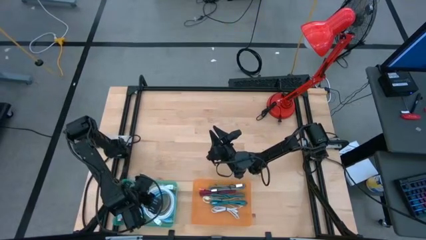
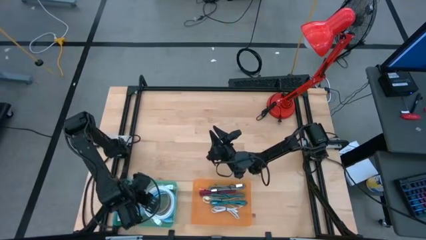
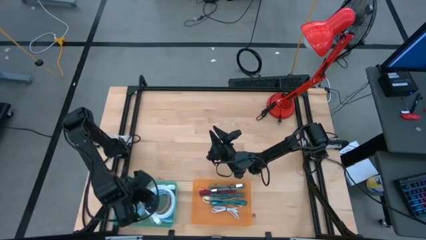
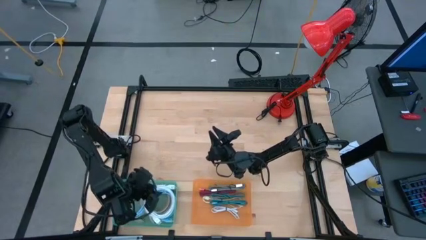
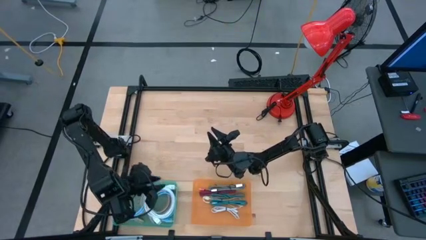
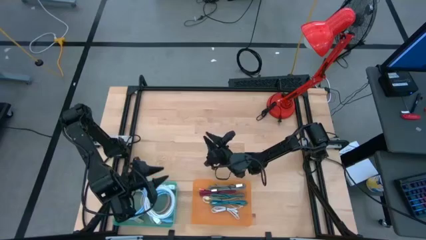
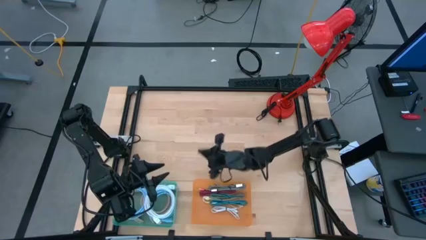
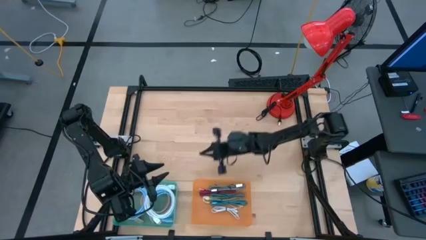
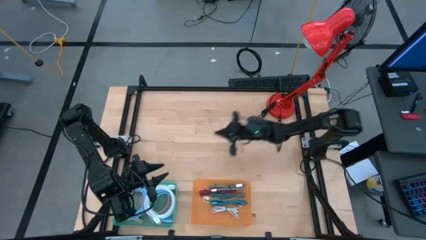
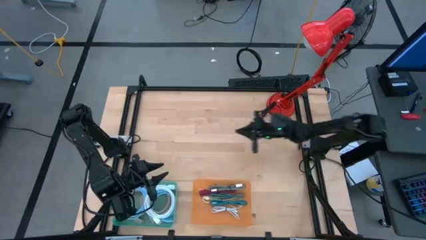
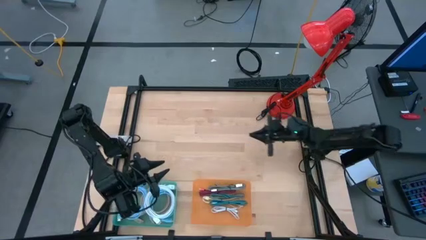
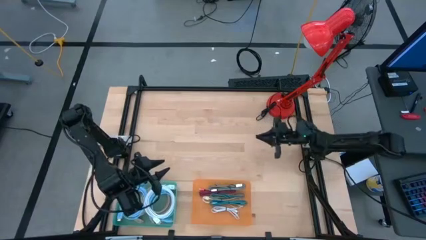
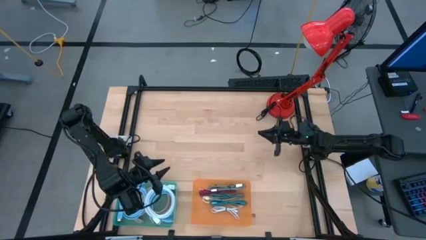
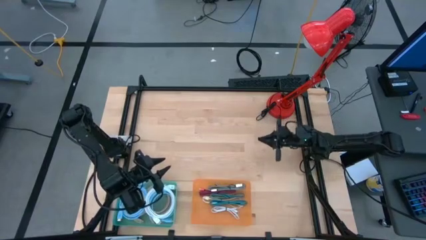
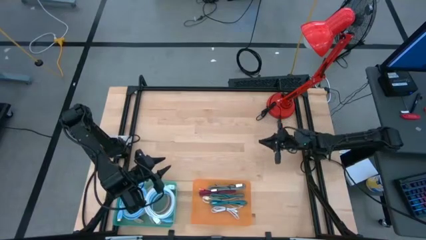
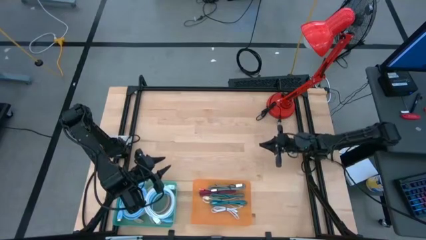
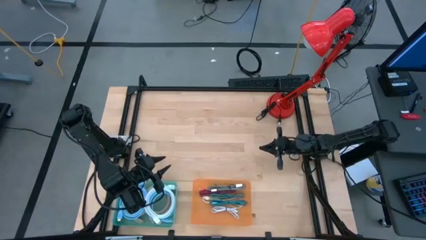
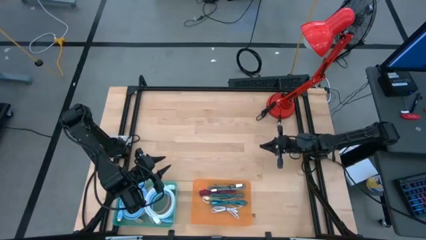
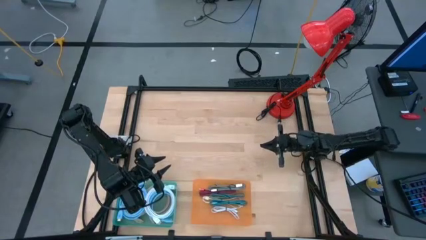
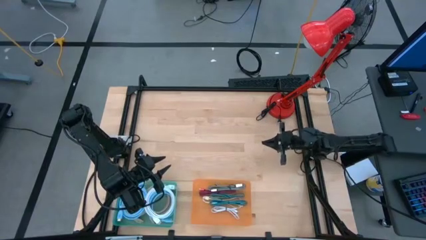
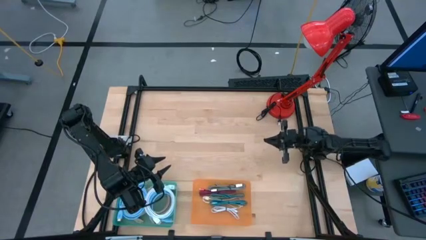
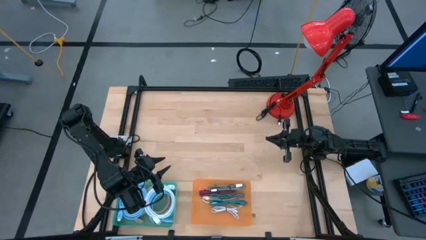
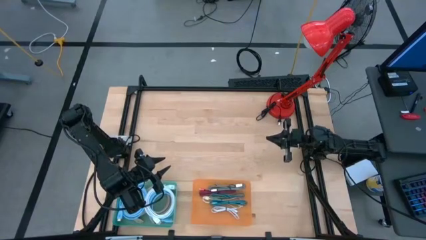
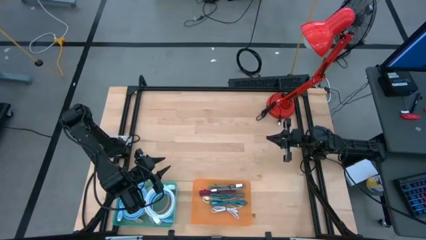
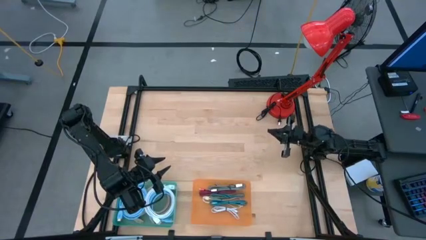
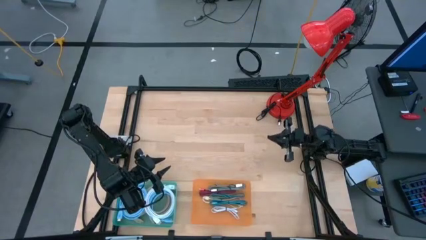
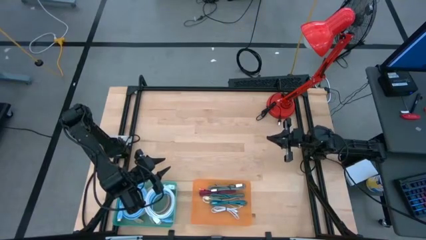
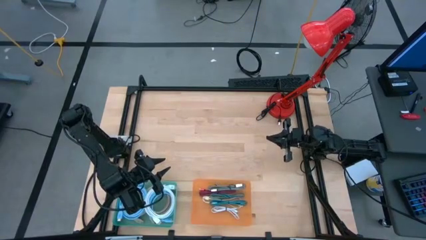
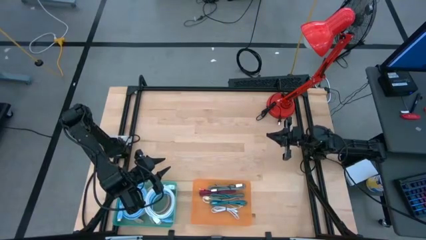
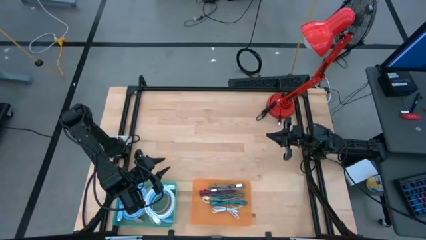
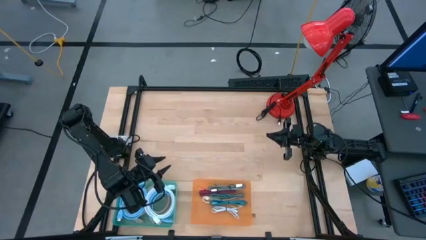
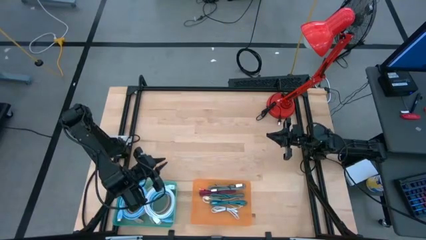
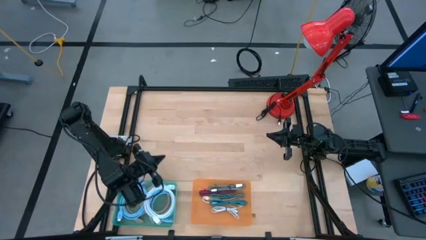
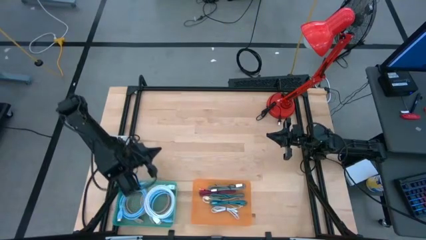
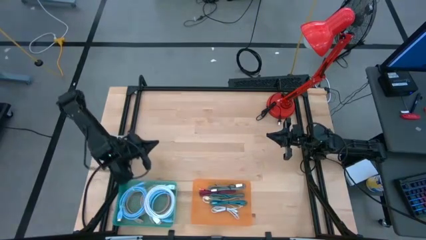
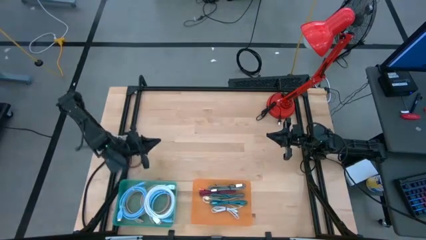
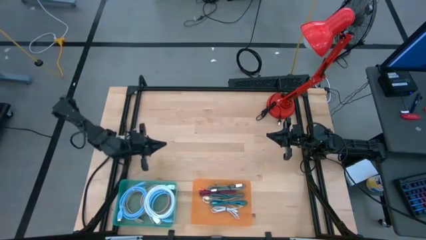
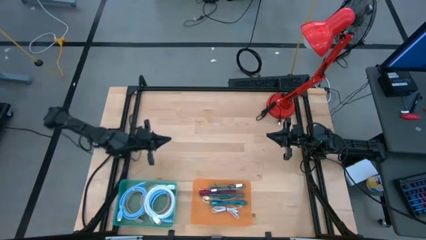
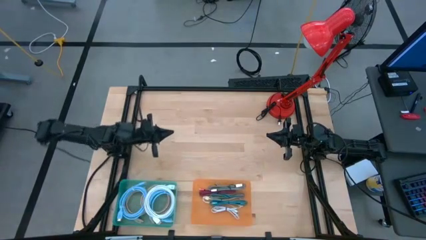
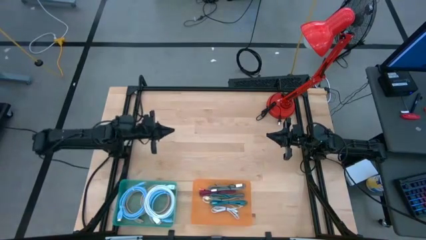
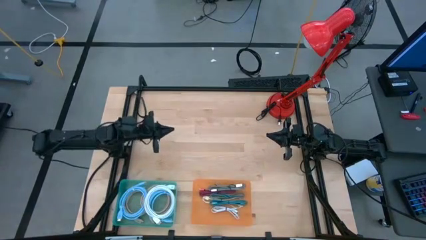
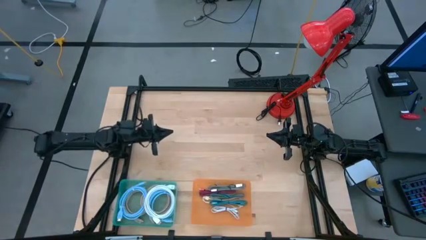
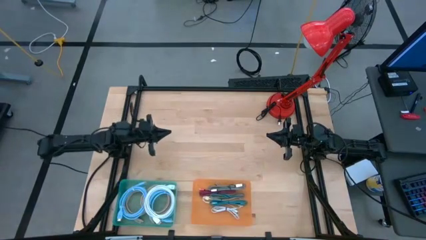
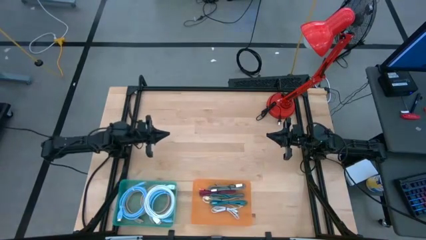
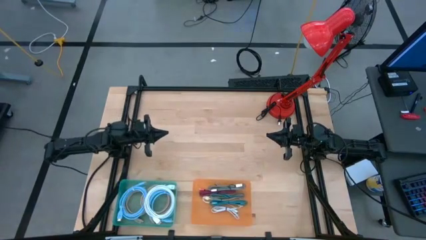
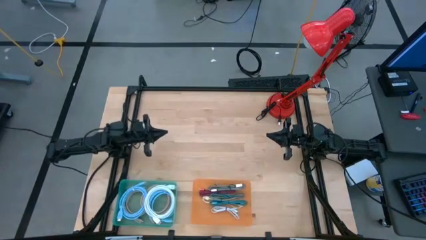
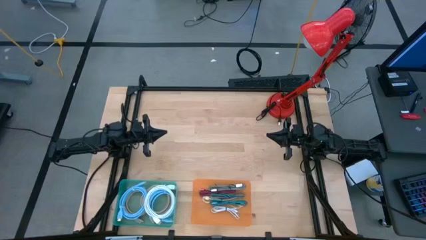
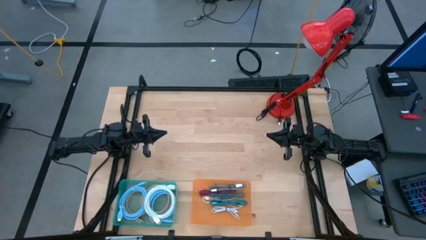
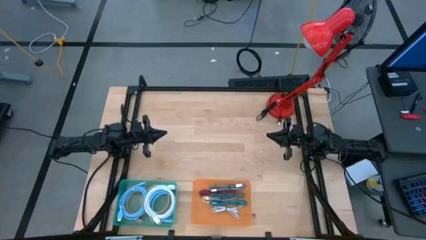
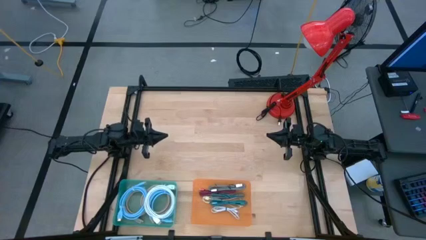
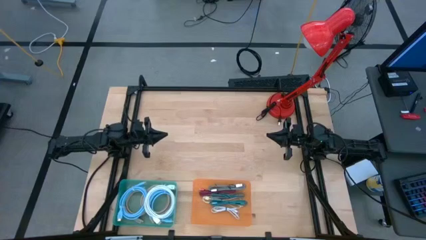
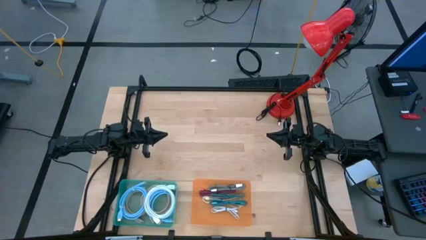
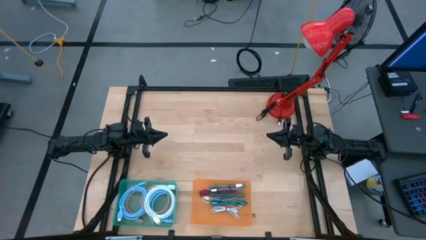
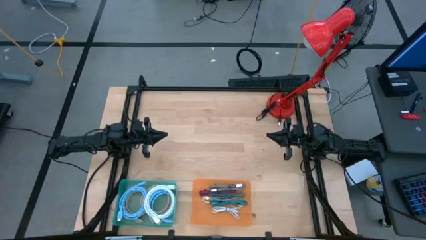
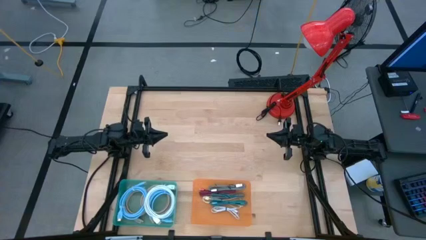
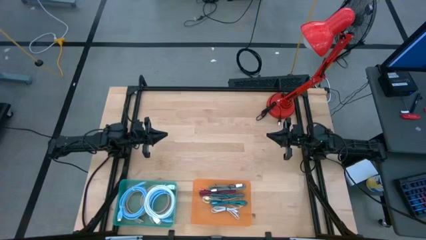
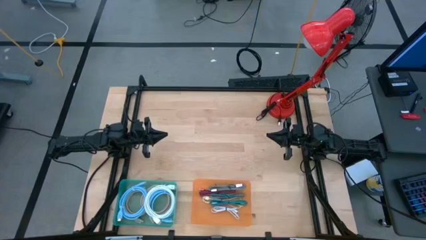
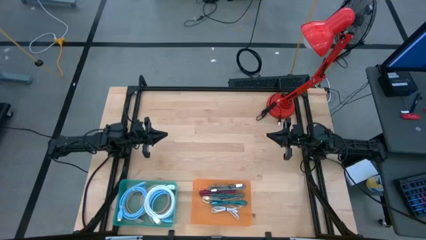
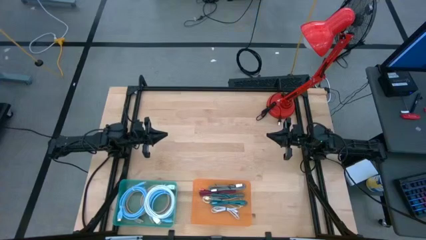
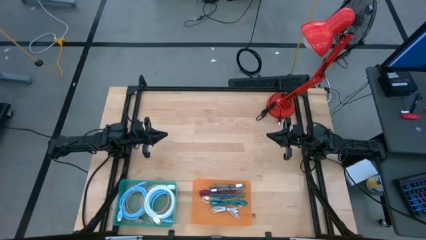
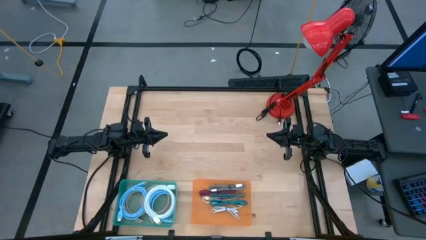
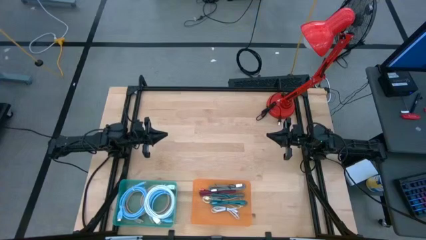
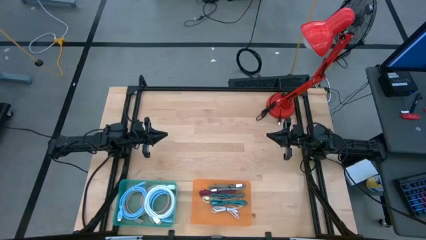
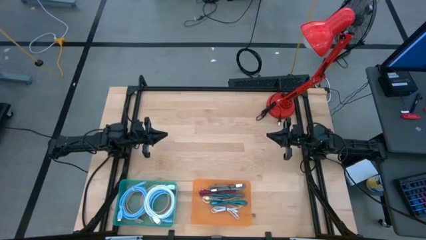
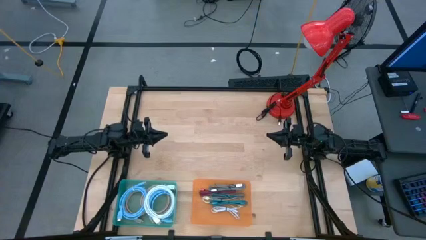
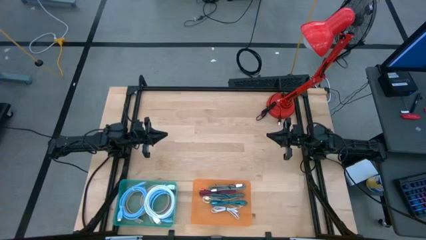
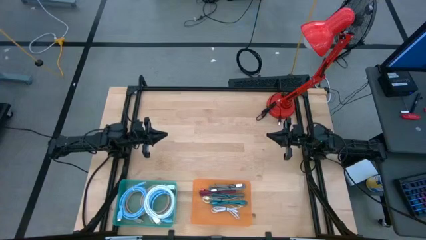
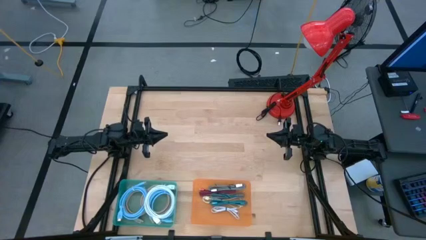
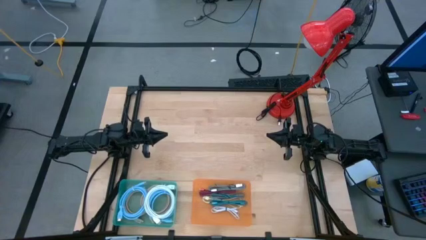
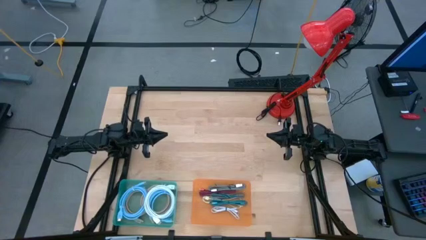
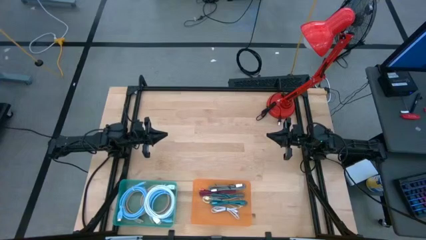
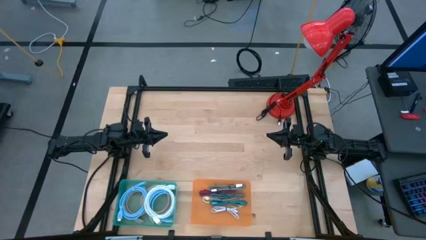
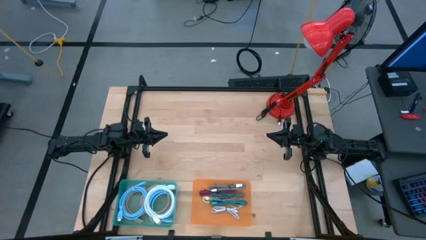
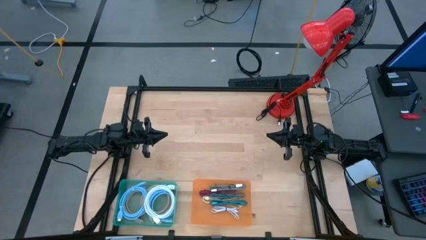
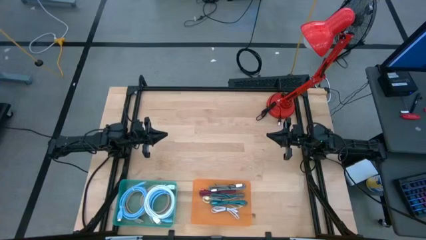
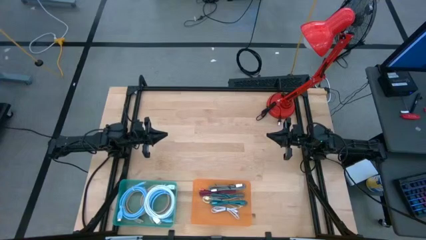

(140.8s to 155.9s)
Task: Pick & Place USB Port
Return to Home Position

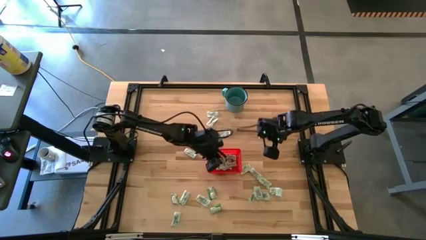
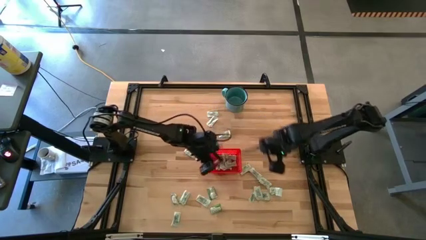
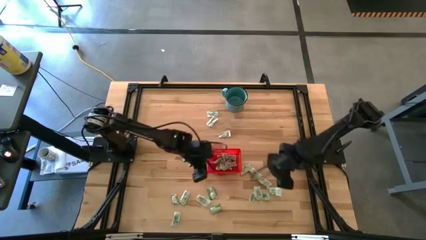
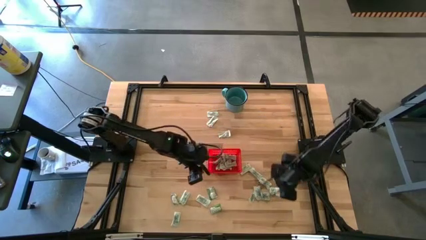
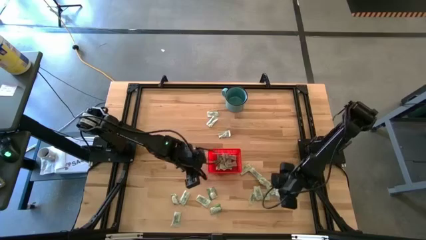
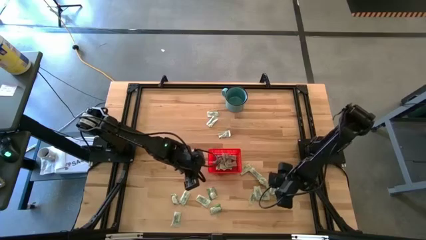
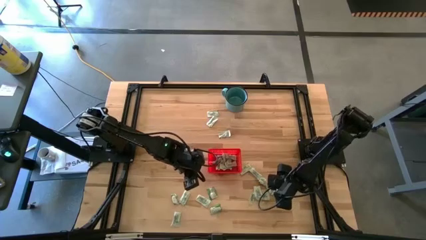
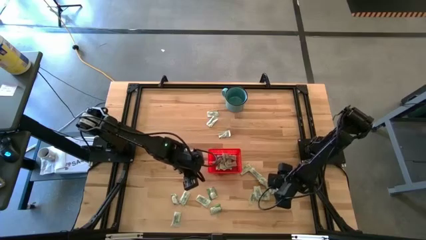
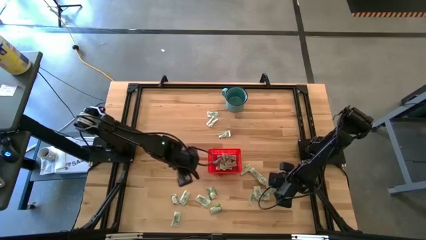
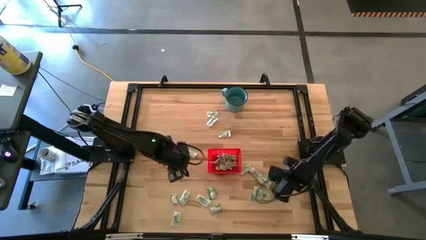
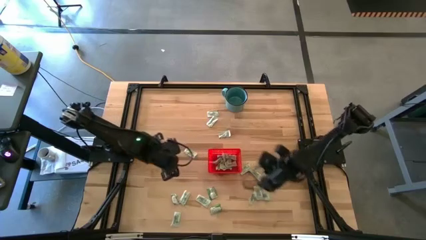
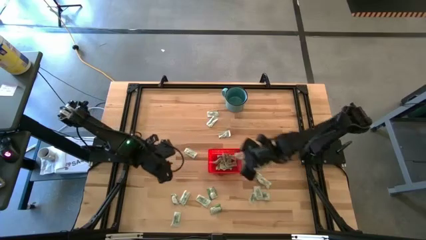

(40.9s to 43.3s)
Task: Pick and place Stevia / Truvia into bins
Put the green stevia packet into the red bin
